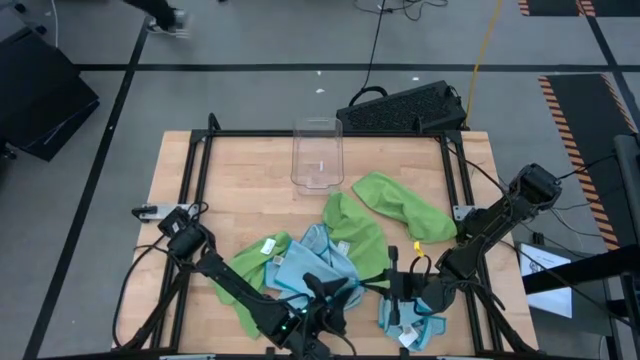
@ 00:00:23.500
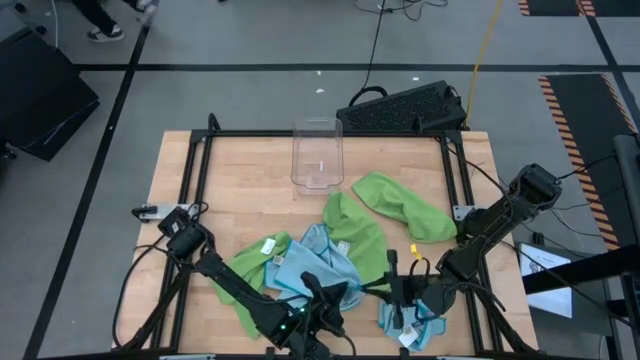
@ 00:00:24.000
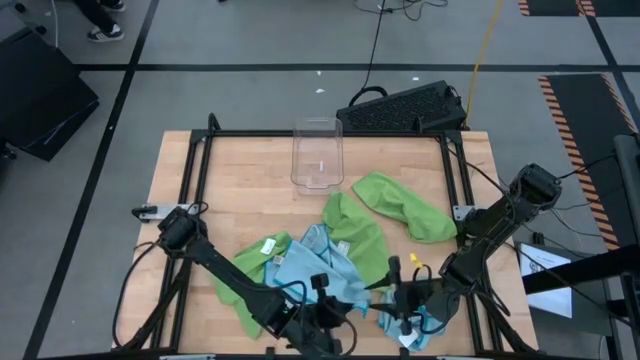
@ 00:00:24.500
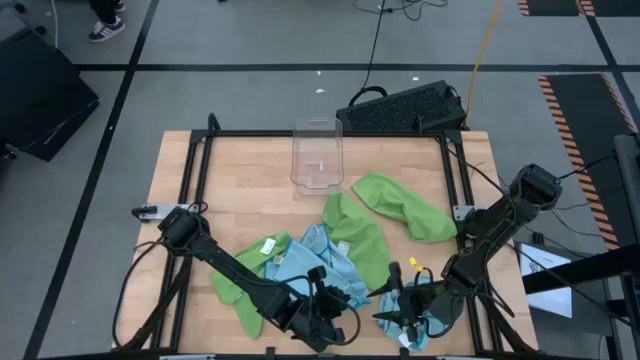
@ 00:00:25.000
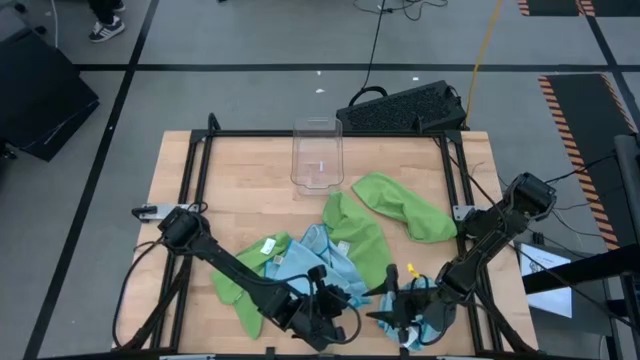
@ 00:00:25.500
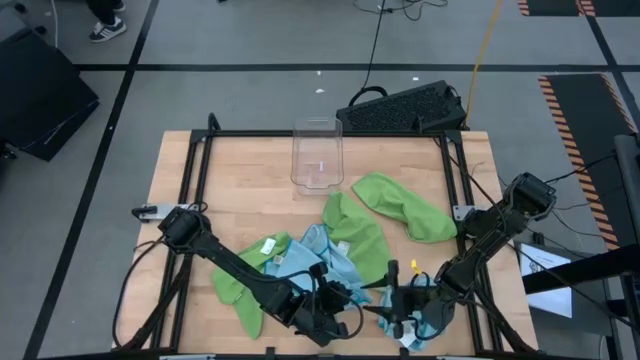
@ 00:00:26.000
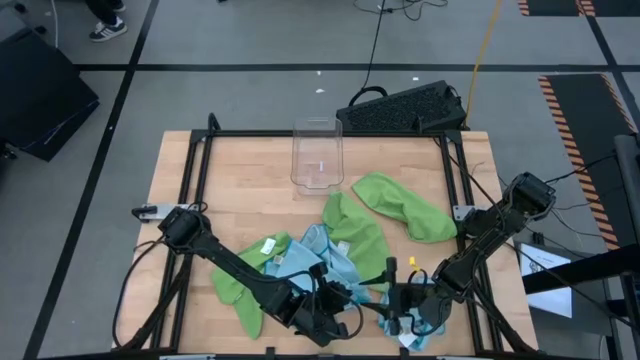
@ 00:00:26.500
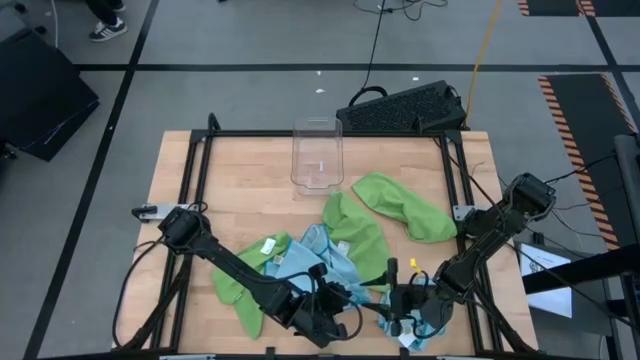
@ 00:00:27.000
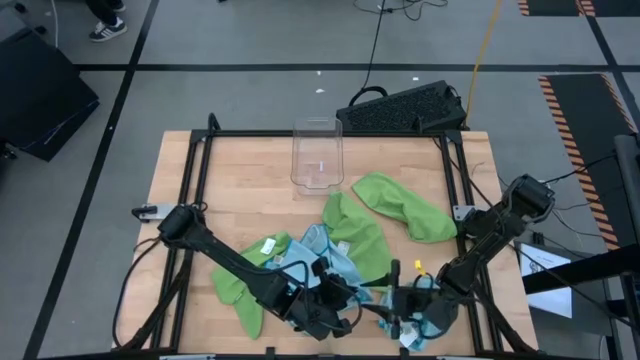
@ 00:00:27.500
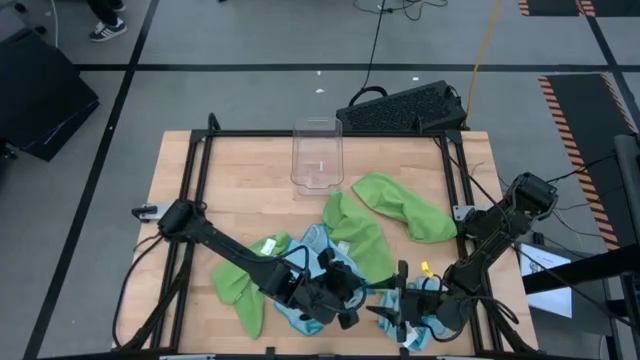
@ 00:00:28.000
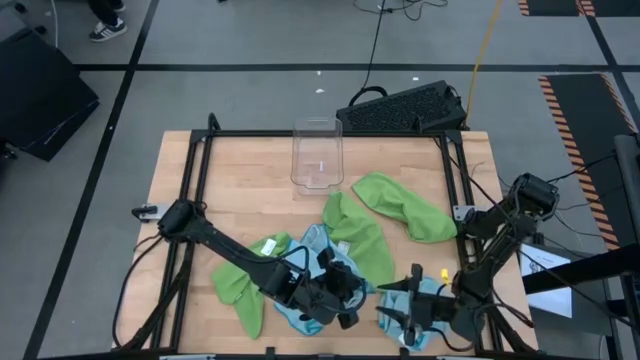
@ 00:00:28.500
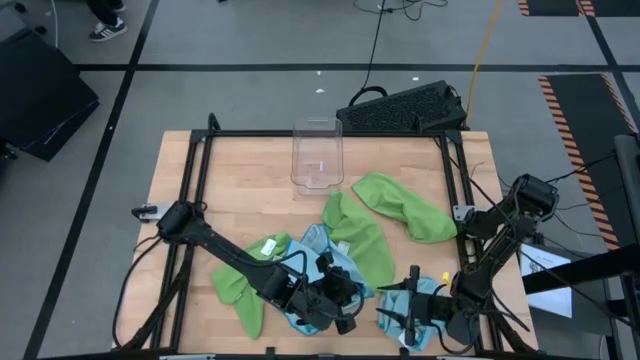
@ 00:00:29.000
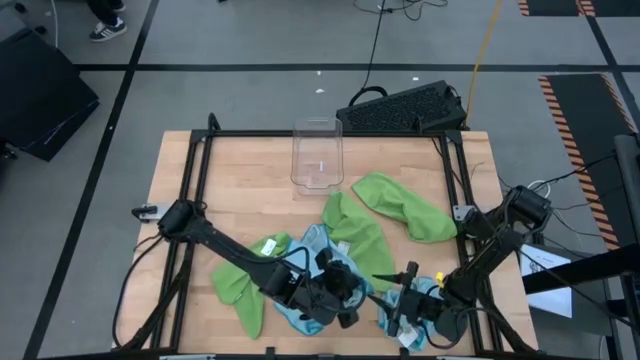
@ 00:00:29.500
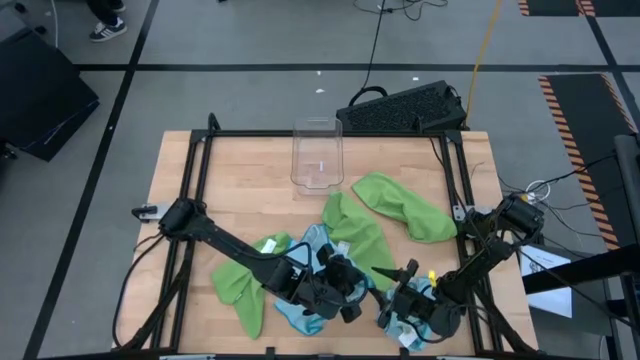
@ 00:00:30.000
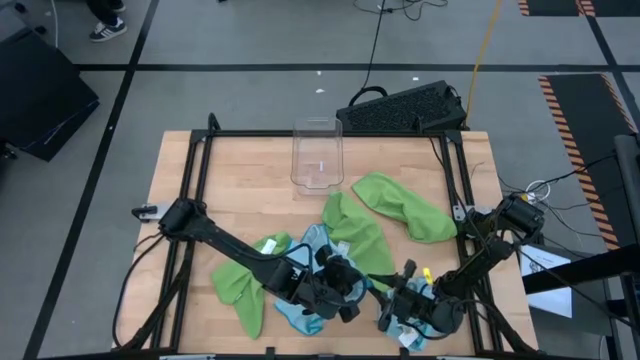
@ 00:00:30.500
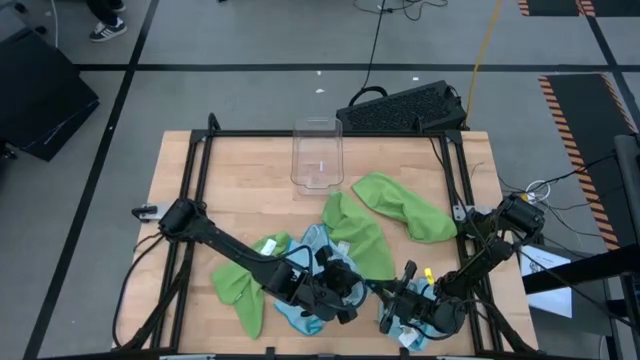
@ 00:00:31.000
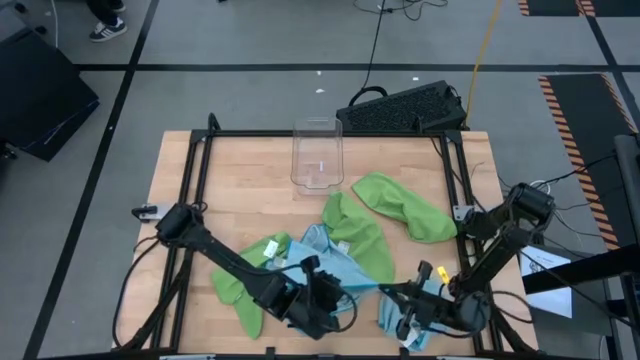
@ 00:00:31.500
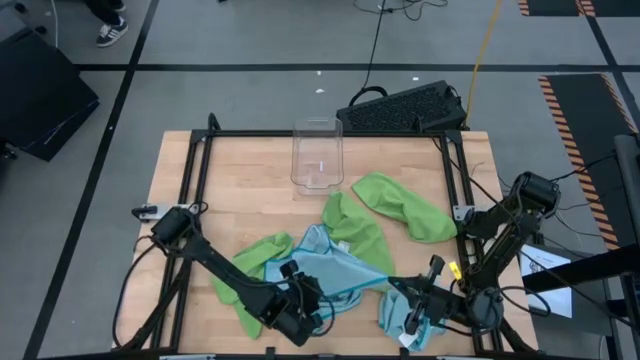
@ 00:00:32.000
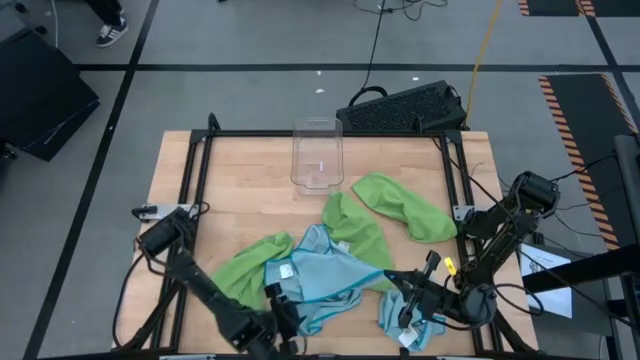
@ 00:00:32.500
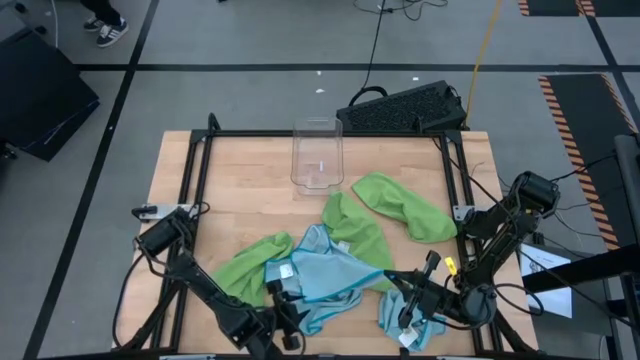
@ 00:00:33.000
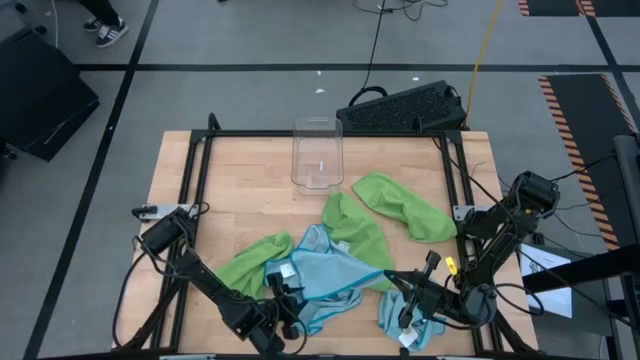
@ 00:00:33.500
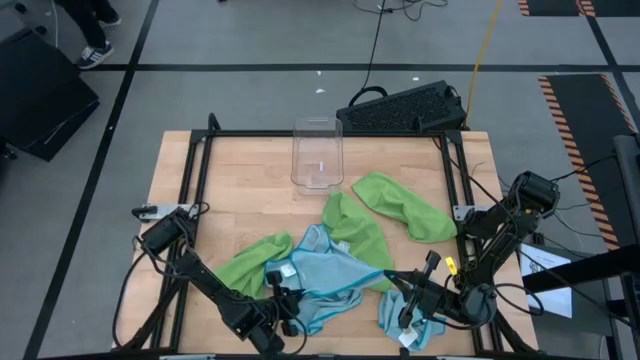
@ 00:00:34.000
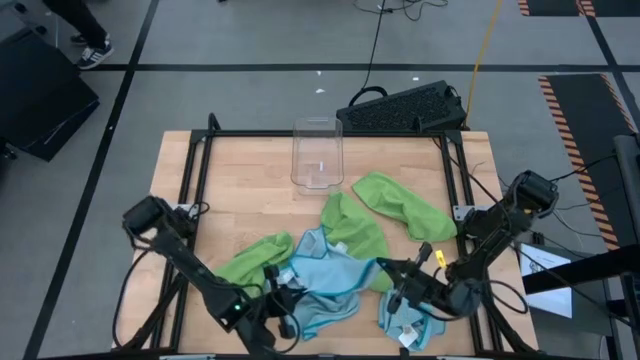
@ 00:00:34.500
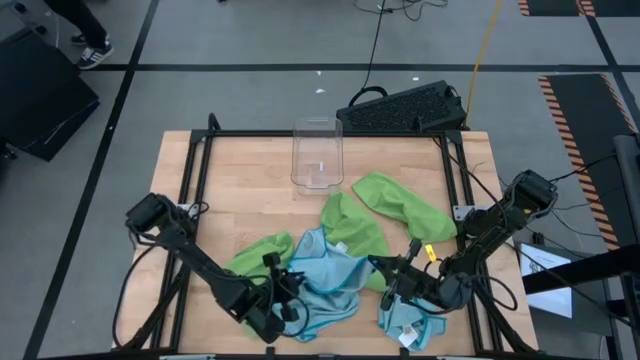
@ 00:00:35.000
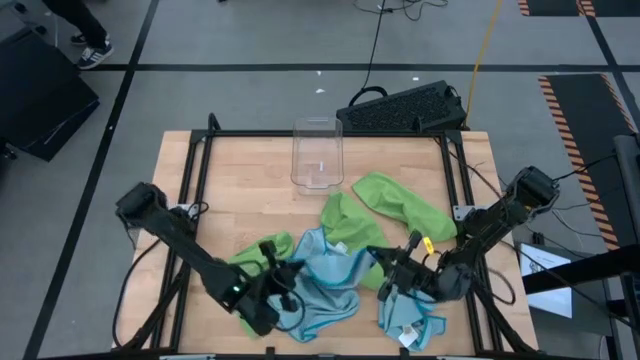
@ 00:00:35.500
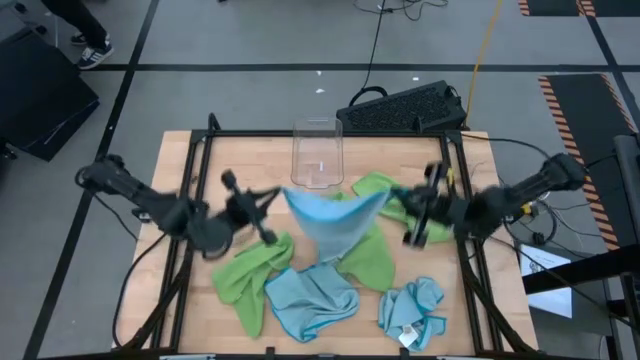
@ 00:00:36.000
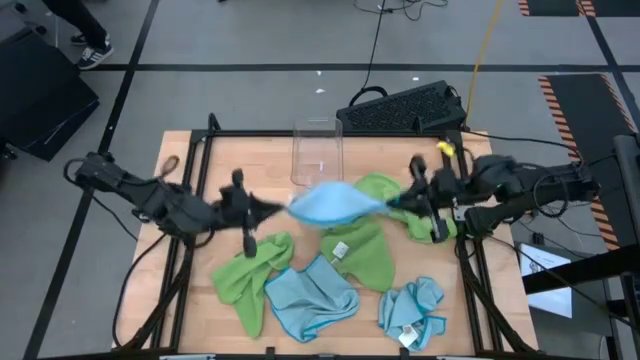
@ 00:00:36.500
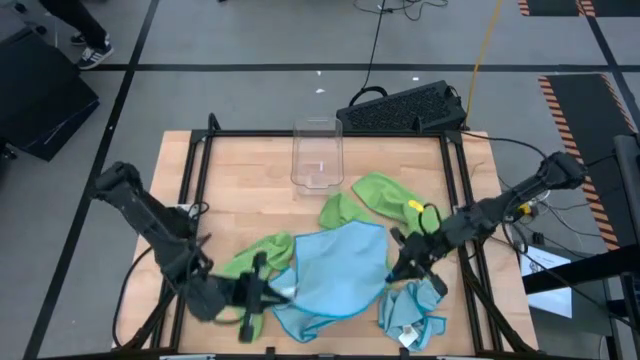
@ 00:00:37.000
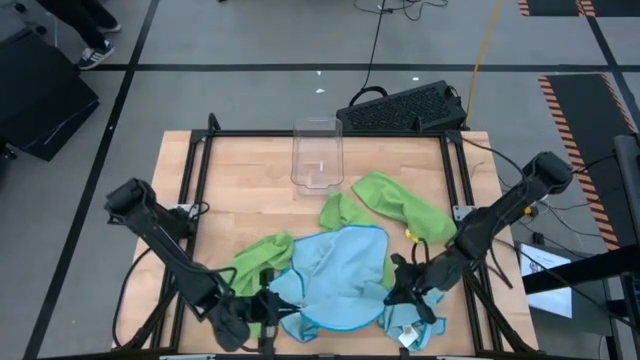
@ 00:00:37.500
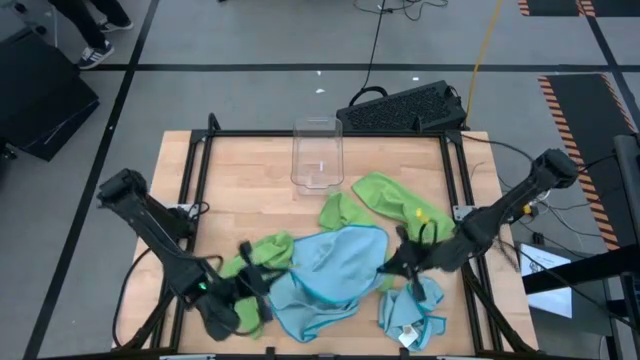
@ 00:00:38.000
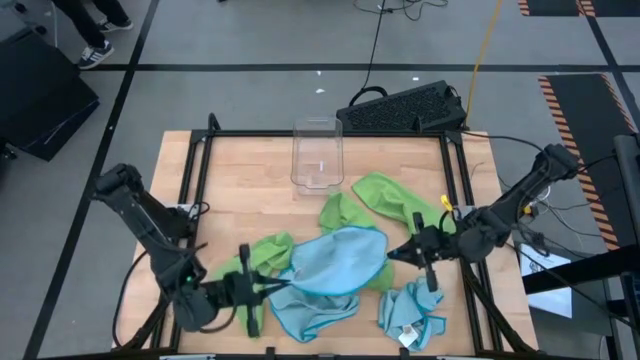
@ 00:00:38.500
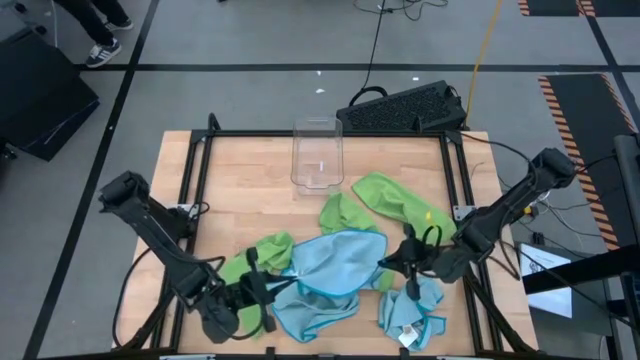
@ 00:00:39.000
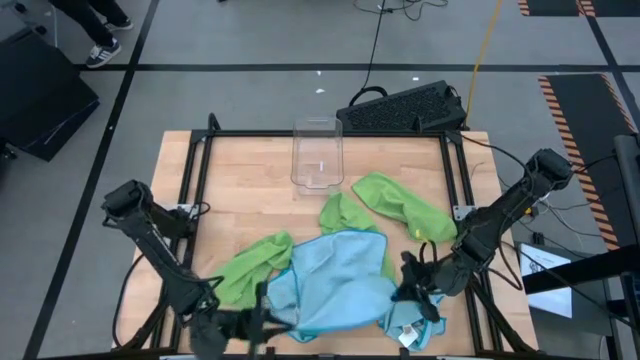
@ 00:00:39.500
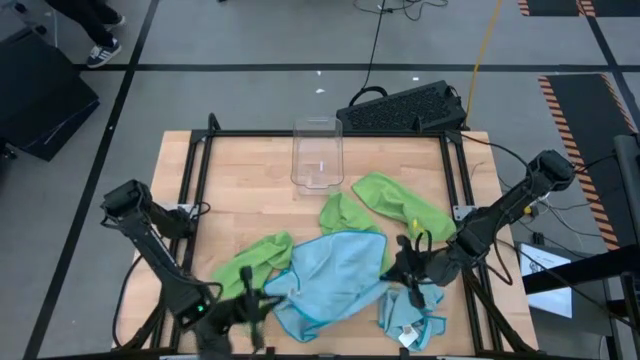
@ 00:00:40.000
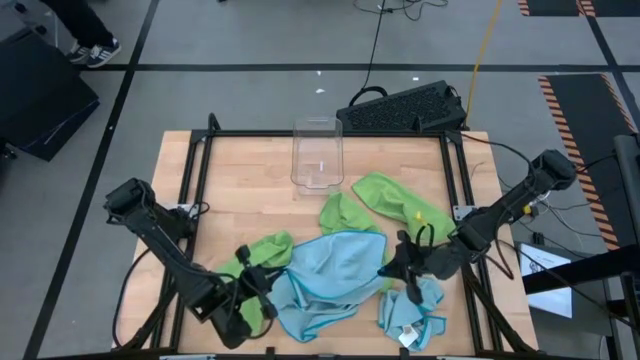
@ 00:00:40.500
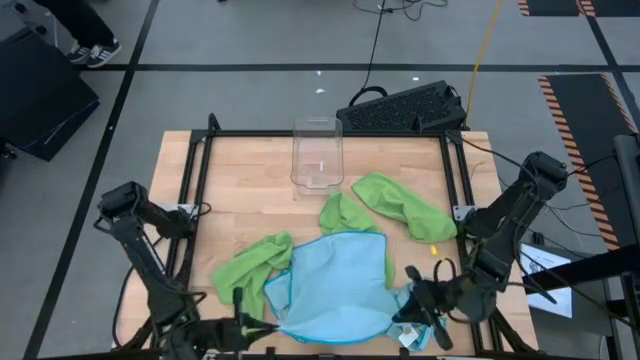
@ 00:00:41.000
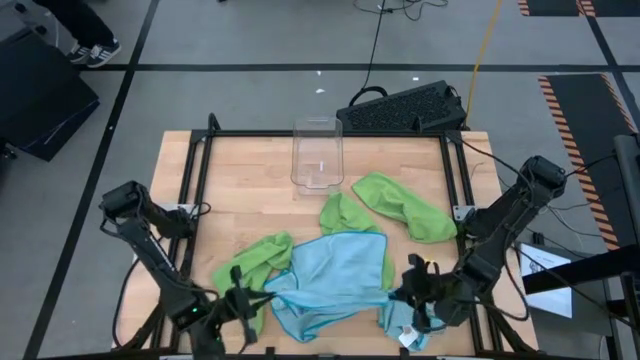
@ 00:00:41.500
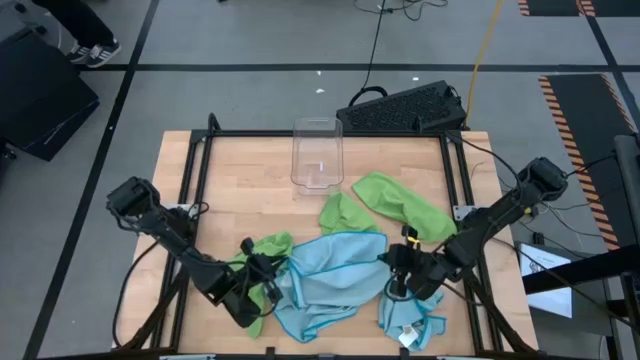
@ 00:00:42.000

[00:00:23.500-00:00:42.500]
Task: Fold microfiber towels
Fold the top left blue towel
